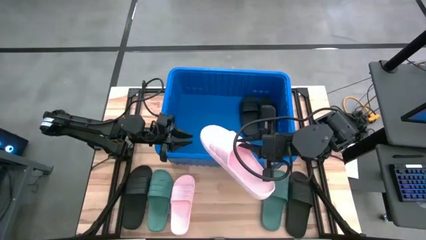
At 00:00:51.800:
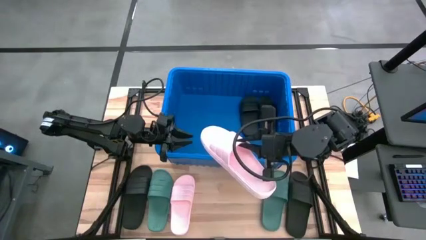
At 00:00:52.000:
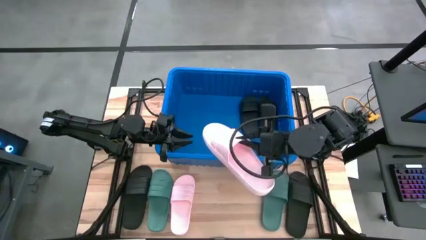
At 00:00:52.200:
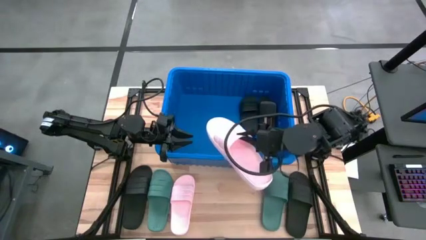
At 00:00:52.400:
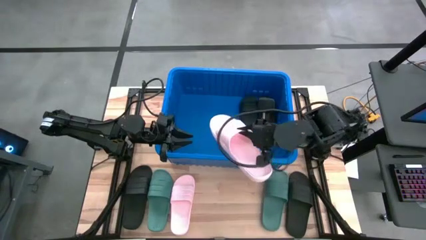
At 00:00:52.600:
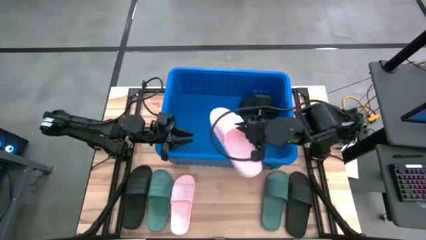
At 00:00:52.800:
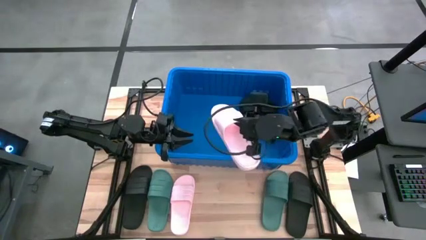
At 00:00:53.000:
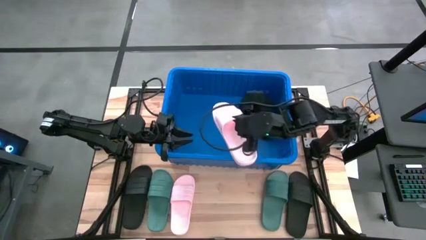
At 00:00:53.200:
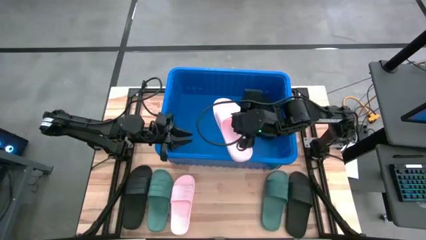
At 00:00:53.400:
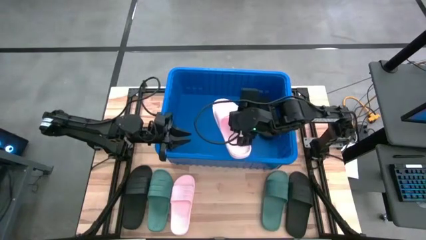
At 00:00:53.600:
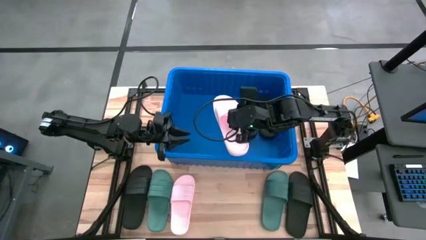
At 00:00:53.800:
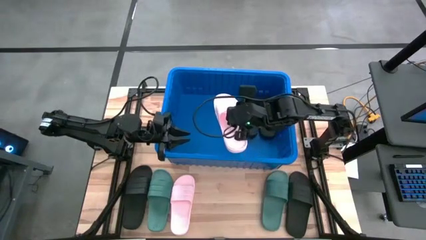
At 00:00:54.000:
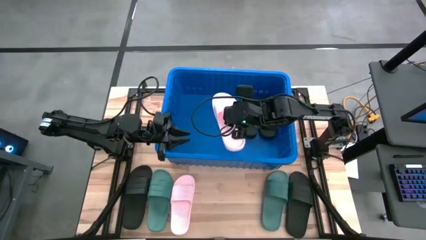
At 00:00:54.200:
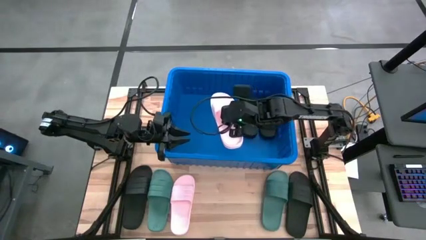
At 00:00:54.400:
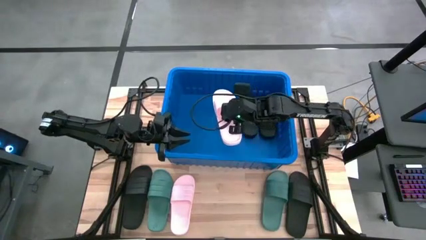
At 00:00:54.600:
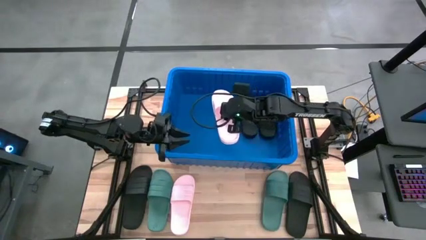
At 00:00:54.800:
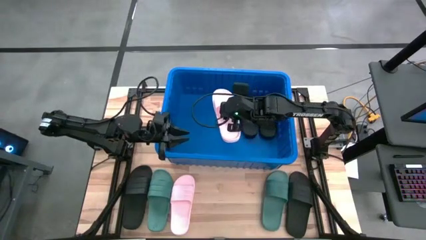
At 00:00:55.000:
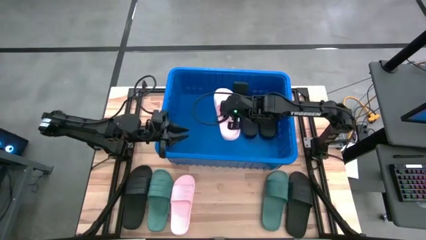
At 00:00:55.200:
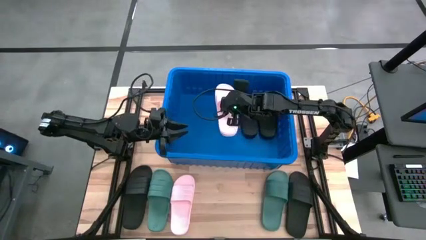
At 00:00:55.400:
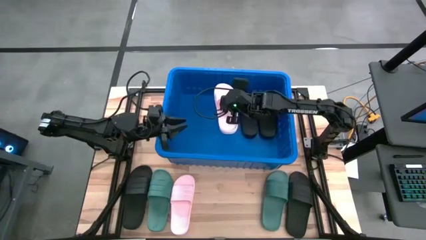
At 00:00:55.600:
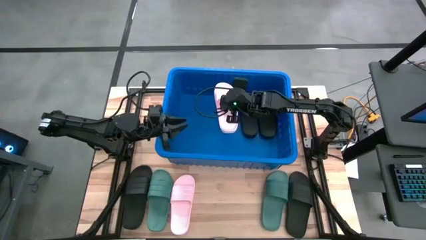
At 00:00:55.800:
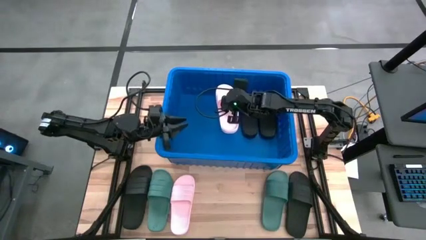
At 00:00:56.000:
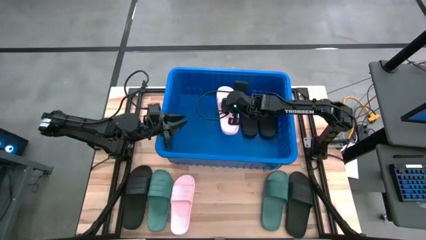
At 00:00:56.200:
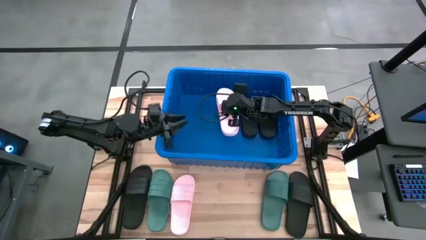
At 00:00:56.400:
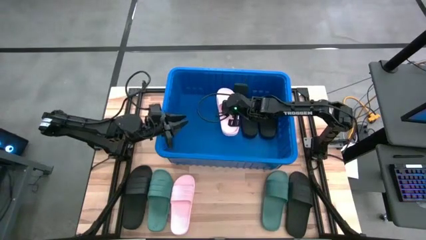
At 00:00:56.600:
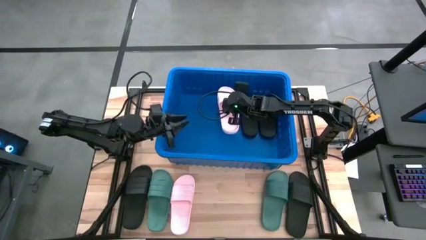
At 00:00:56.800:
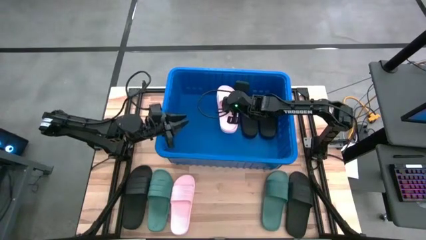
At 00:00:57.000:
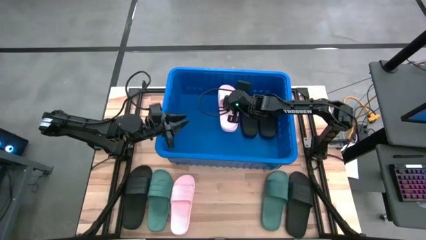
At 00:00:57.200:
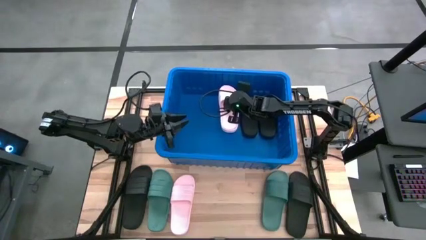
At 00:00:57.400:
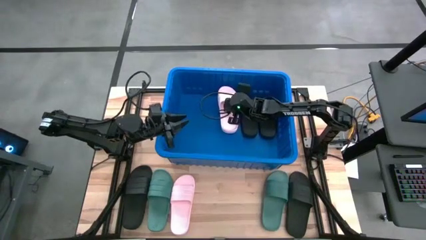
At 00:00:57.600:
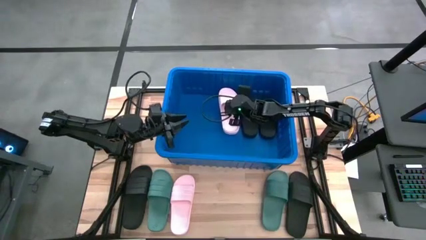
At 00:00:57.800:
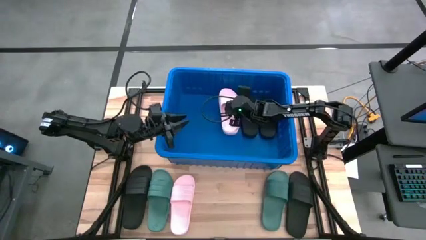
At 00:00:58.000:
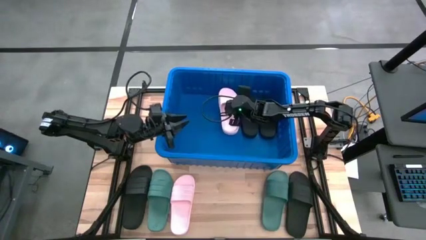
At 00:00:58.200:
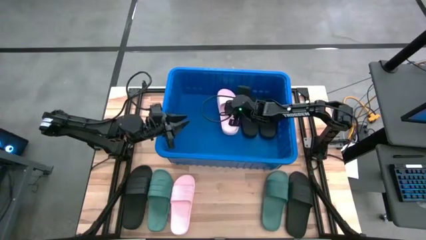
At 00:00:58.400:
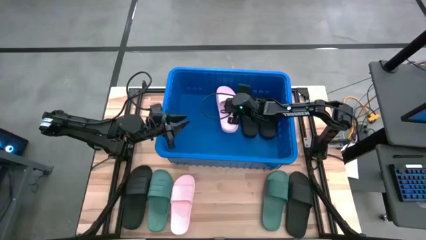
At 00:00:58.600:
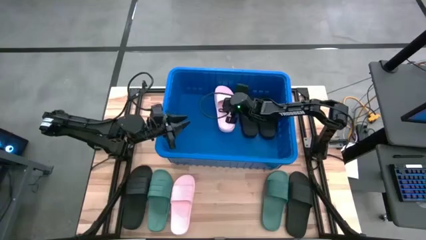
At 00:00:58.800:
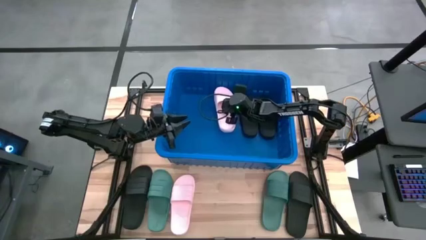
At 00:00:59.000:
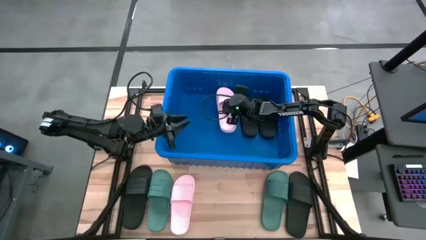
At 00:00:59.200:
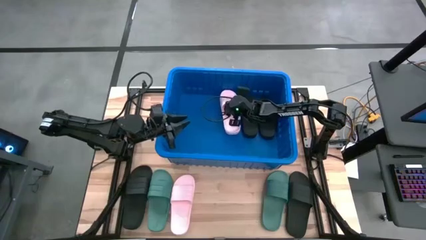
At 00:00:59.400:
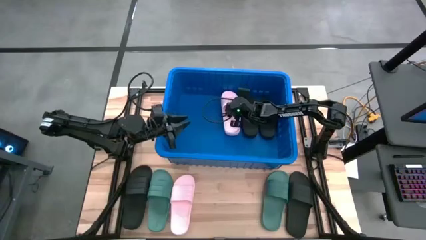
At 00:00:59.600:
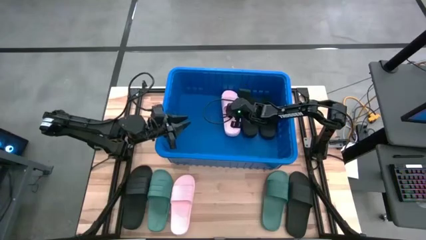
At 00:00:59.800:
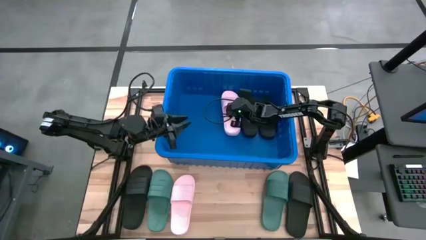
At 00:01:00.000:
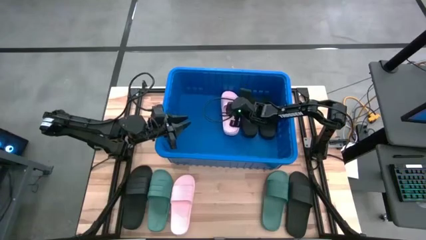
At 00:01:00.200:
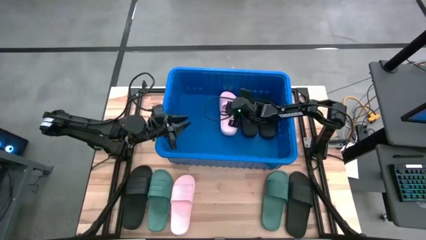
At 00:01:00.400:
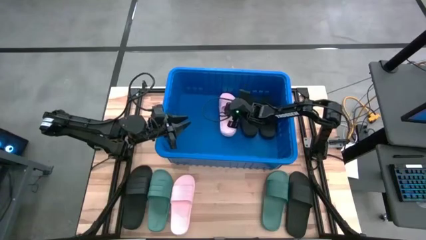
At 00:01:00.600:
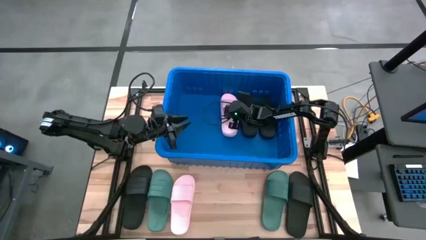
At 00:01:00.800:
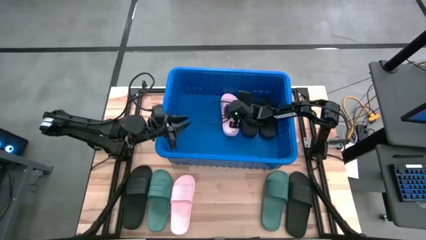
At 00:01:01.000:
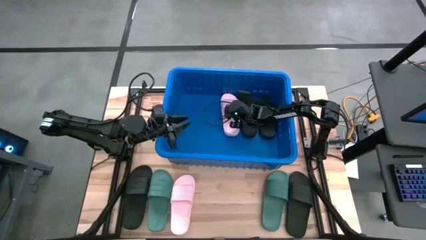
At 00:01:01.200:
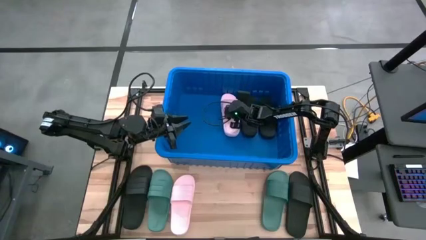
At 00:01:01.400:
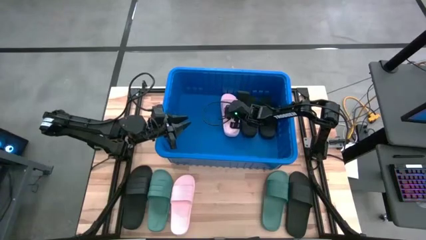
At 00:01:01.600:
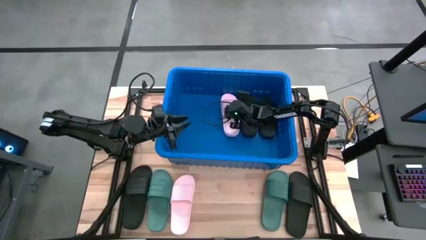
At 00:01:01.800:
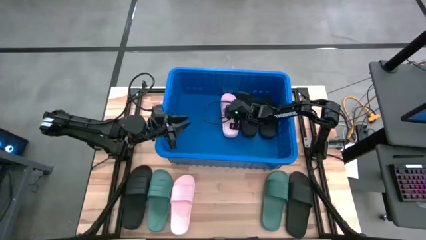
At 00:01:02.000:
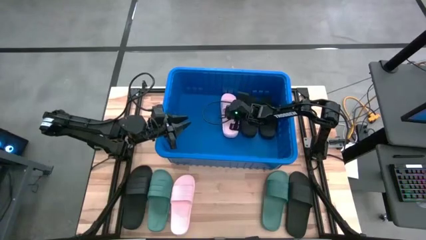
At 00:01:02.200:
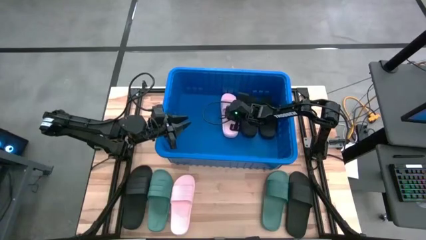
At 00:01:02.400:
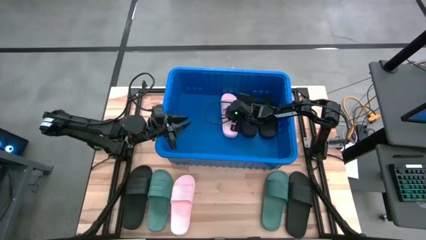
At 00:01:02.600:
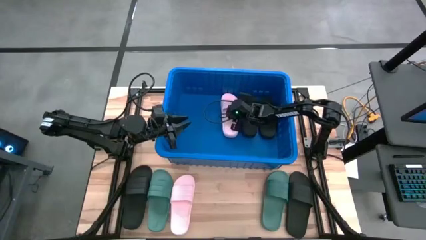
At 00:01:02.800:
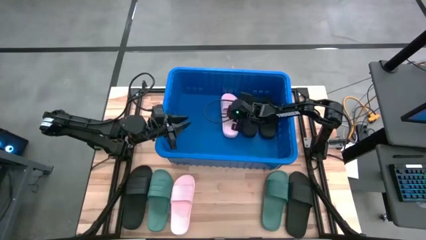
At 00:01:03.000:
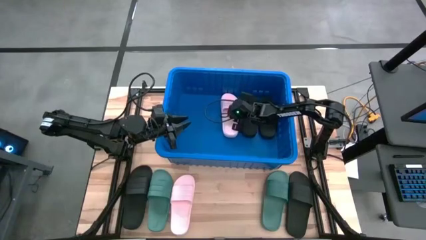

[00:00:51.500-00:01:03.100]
Task: Pick and place slides into bin
Put the right pink slide into the blue bin
